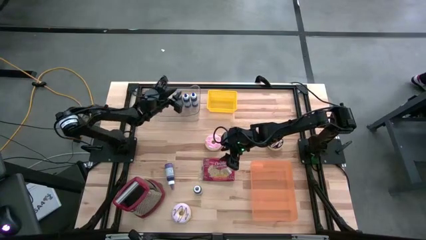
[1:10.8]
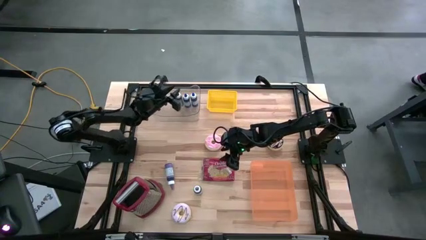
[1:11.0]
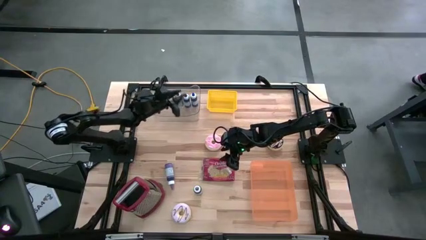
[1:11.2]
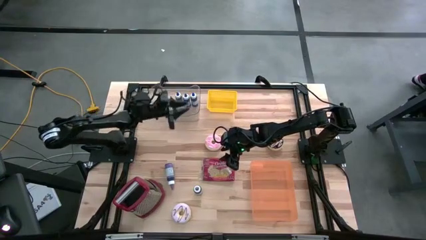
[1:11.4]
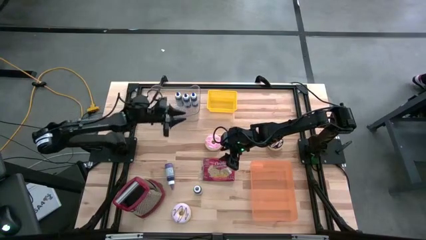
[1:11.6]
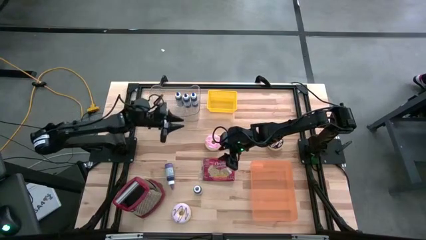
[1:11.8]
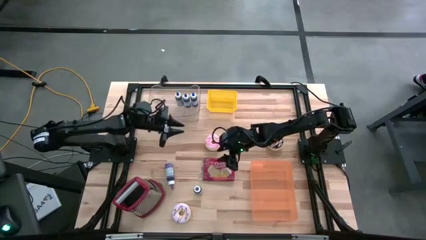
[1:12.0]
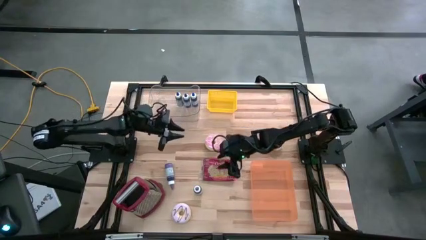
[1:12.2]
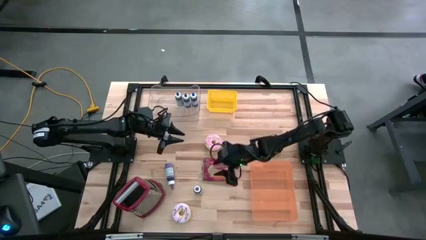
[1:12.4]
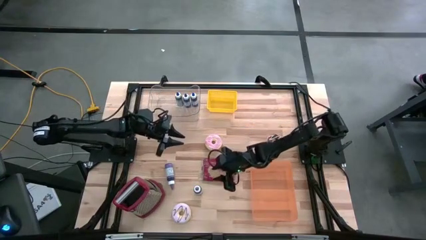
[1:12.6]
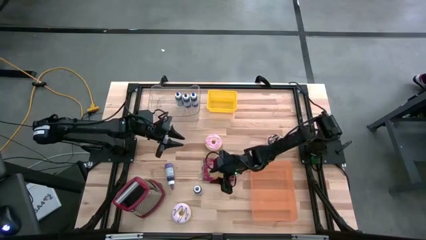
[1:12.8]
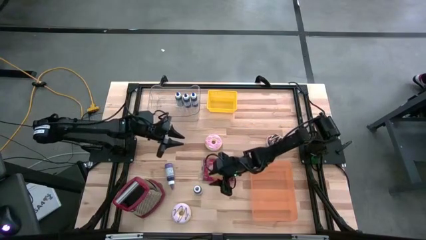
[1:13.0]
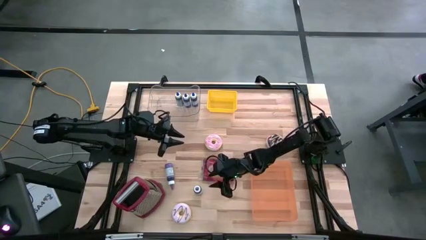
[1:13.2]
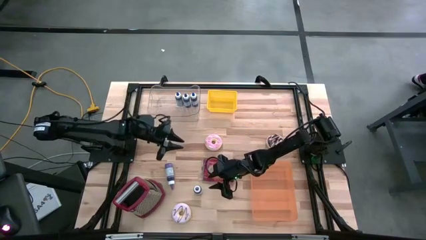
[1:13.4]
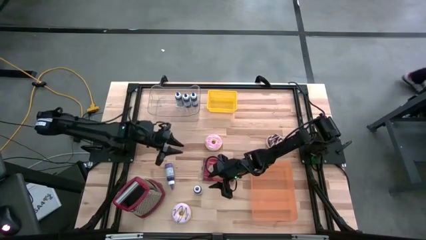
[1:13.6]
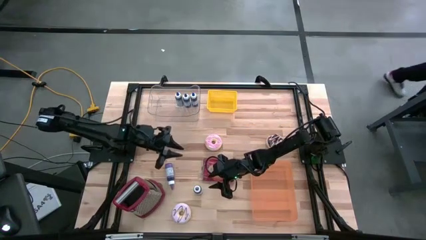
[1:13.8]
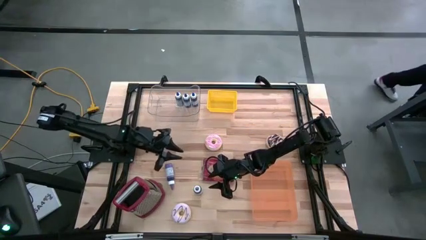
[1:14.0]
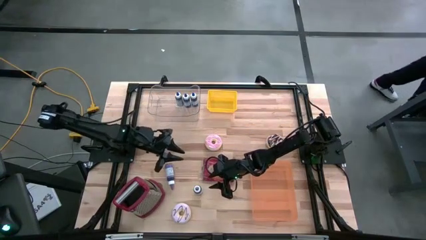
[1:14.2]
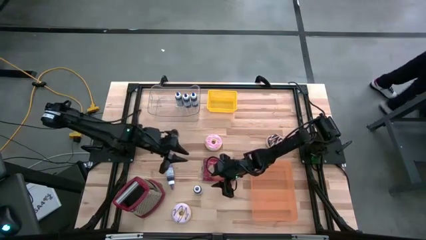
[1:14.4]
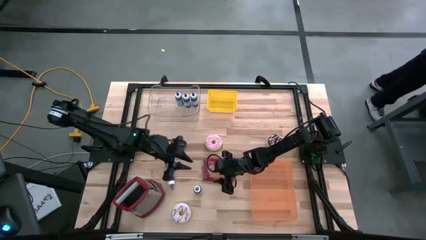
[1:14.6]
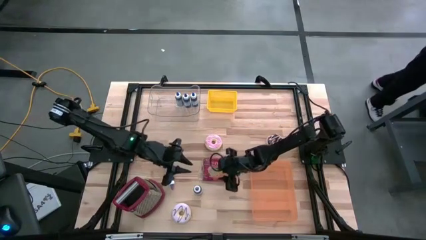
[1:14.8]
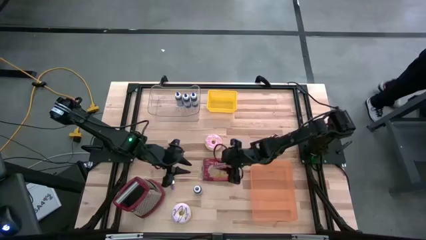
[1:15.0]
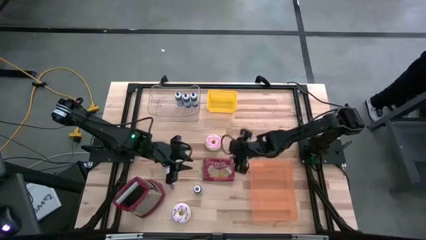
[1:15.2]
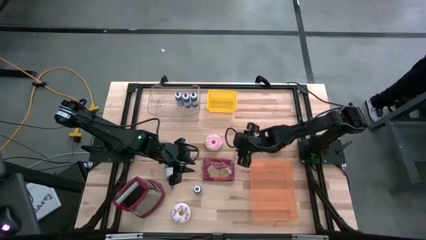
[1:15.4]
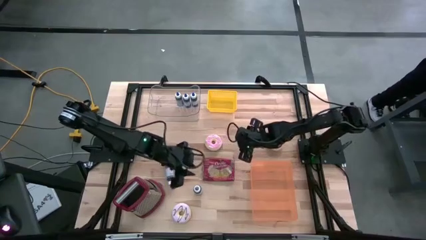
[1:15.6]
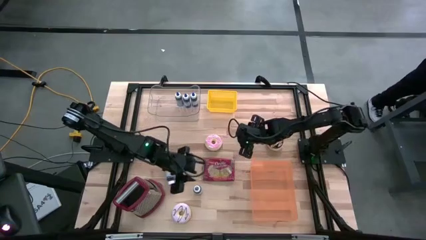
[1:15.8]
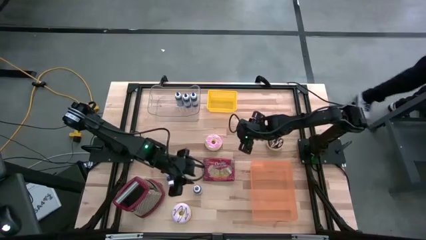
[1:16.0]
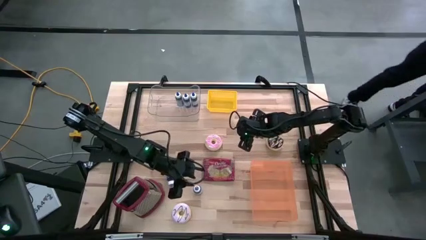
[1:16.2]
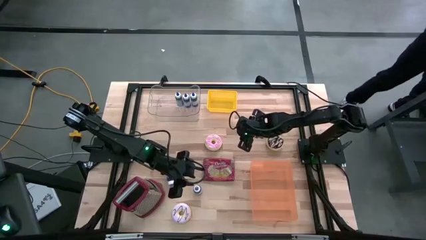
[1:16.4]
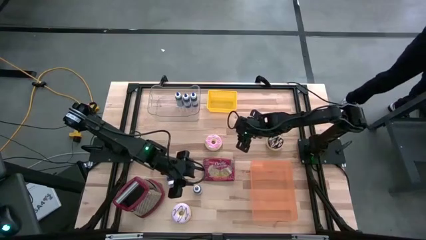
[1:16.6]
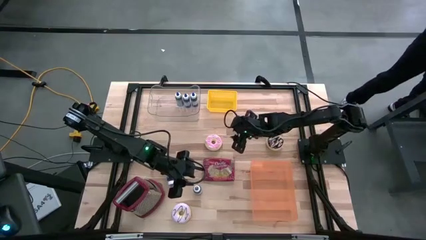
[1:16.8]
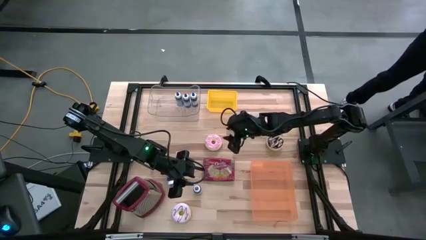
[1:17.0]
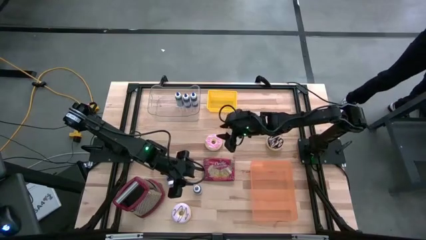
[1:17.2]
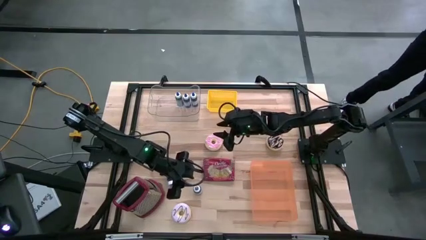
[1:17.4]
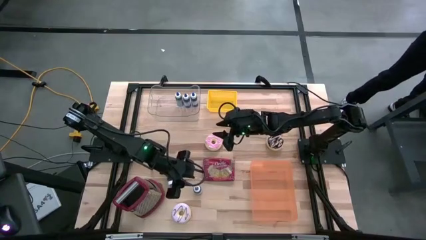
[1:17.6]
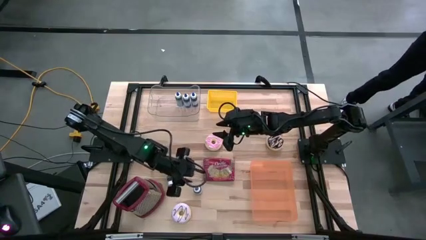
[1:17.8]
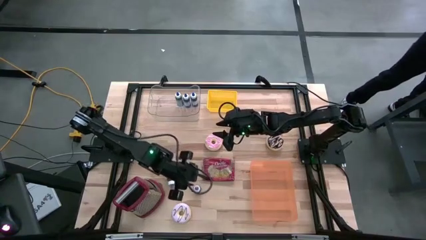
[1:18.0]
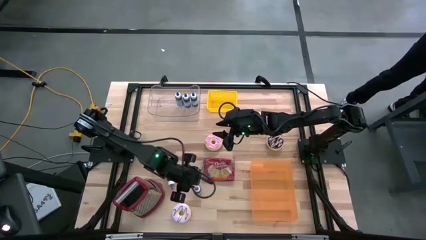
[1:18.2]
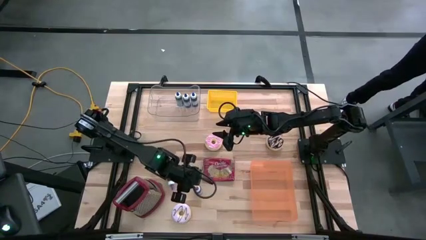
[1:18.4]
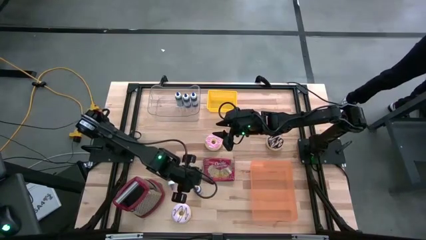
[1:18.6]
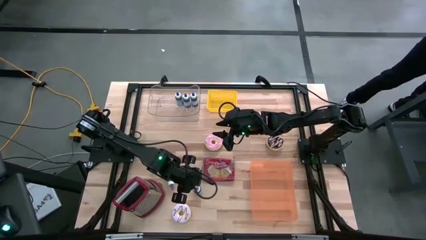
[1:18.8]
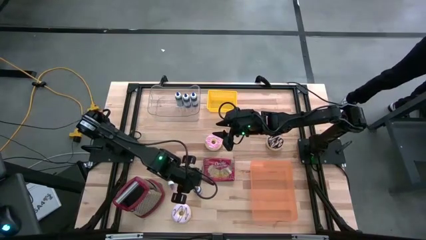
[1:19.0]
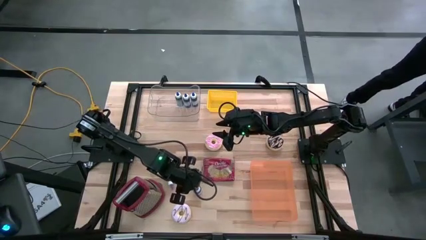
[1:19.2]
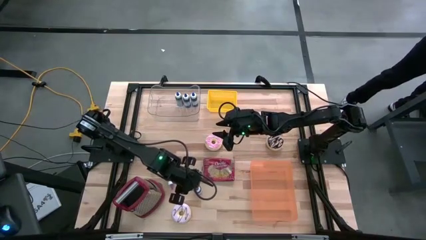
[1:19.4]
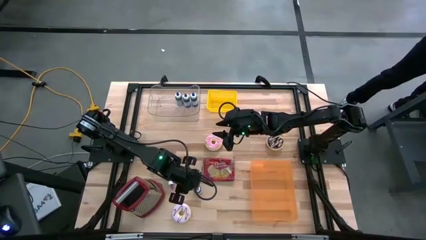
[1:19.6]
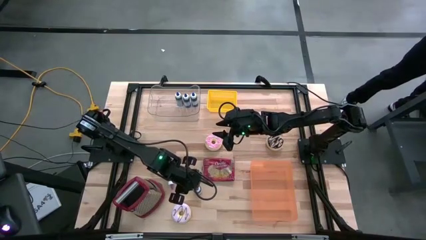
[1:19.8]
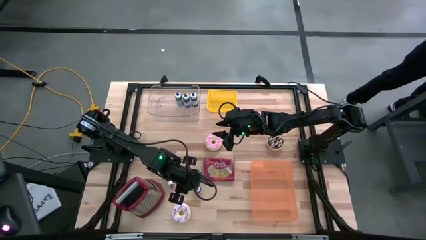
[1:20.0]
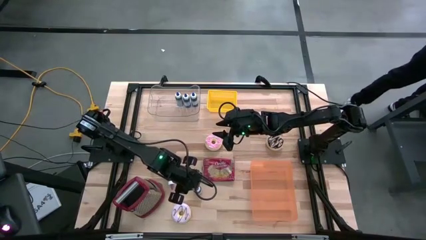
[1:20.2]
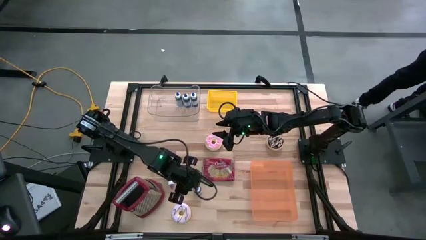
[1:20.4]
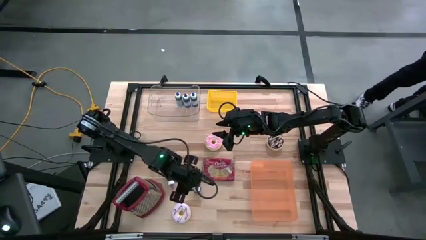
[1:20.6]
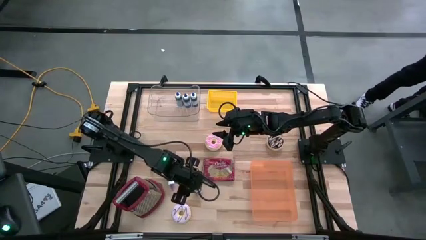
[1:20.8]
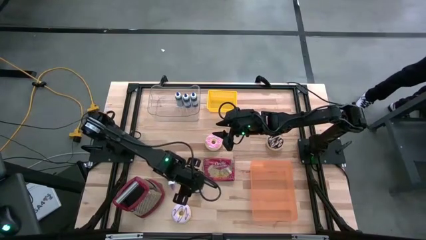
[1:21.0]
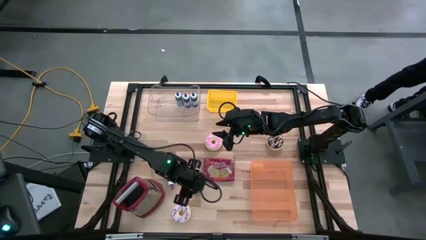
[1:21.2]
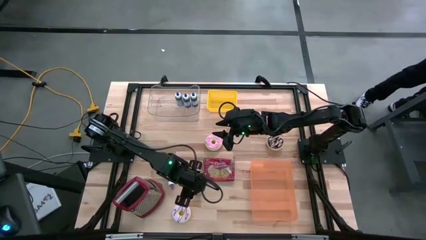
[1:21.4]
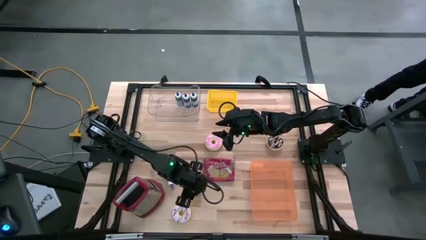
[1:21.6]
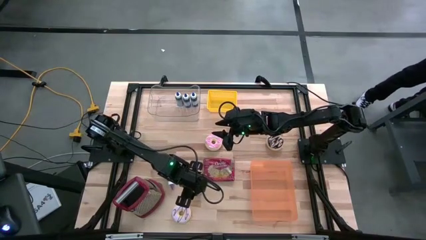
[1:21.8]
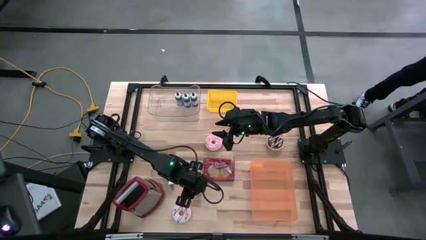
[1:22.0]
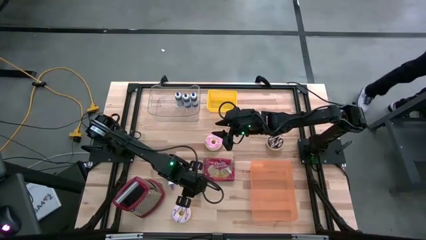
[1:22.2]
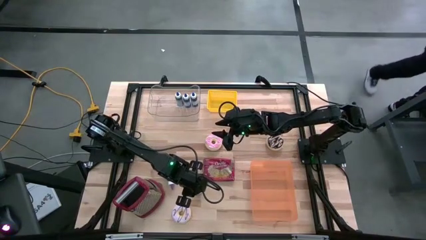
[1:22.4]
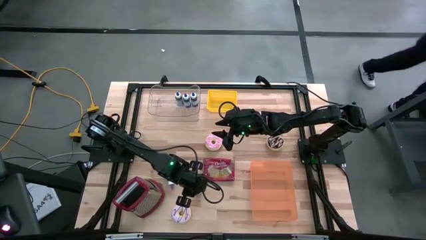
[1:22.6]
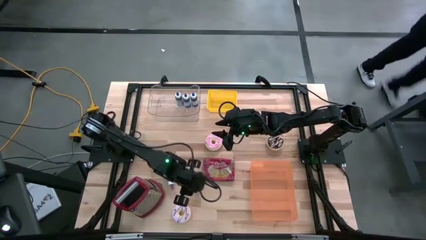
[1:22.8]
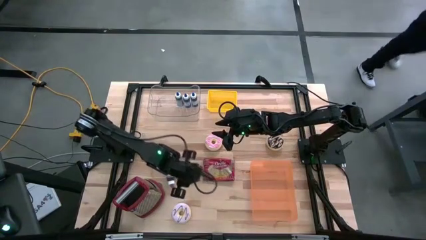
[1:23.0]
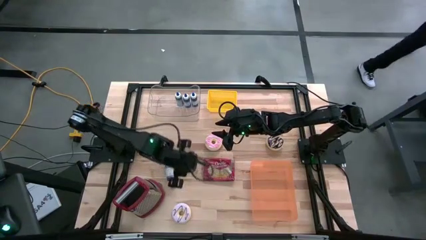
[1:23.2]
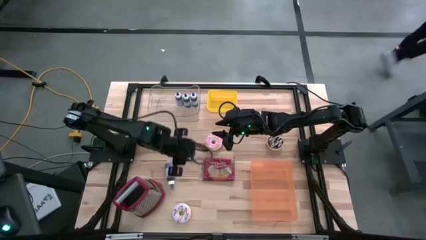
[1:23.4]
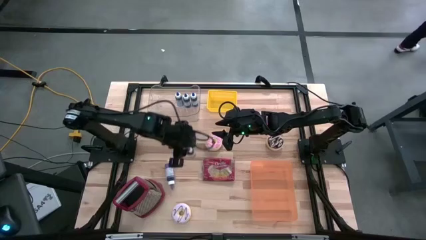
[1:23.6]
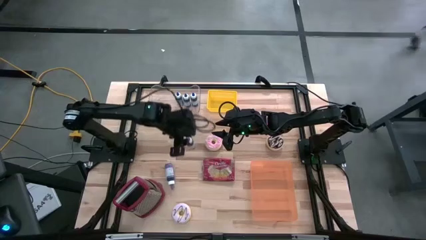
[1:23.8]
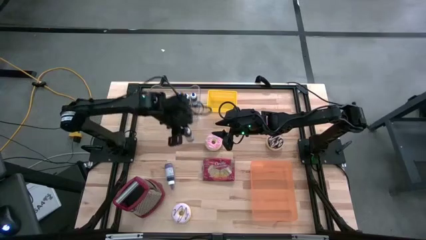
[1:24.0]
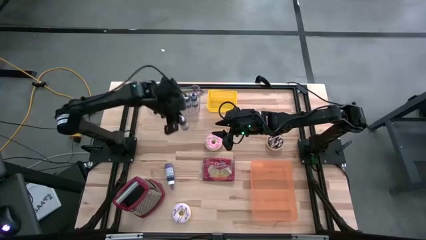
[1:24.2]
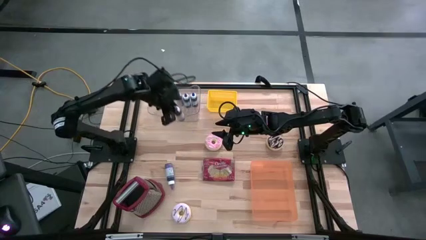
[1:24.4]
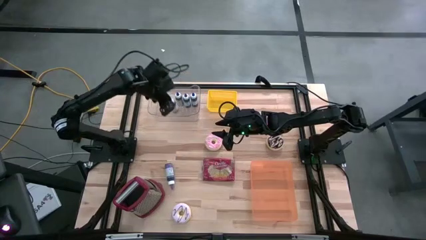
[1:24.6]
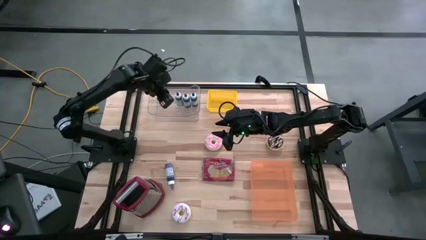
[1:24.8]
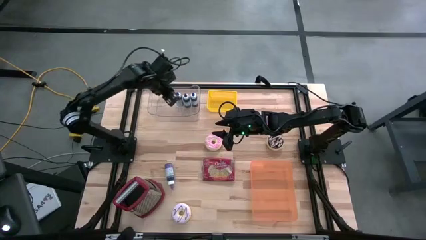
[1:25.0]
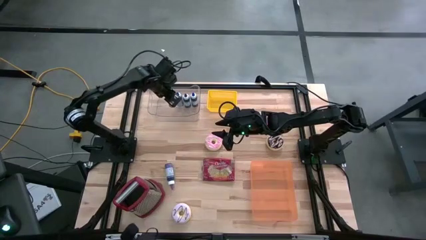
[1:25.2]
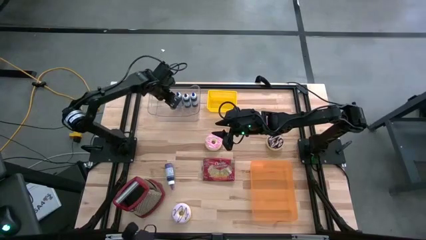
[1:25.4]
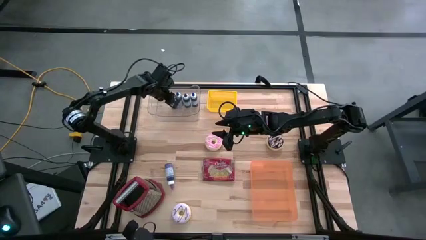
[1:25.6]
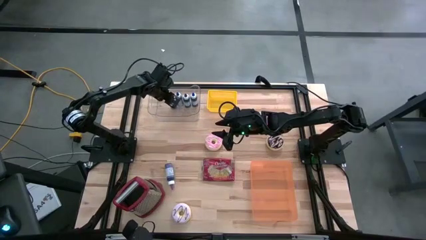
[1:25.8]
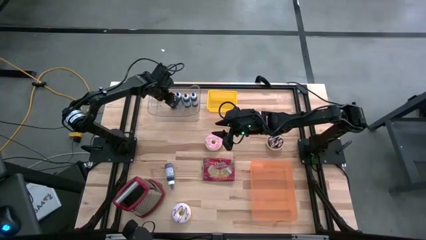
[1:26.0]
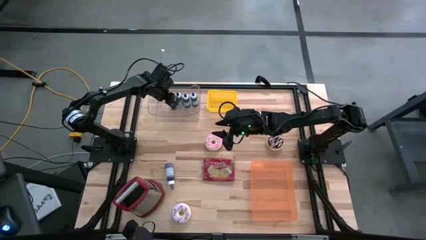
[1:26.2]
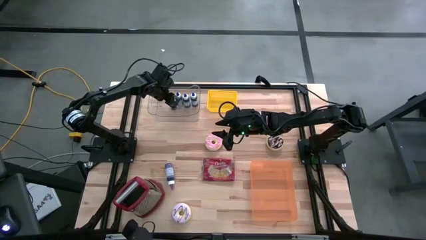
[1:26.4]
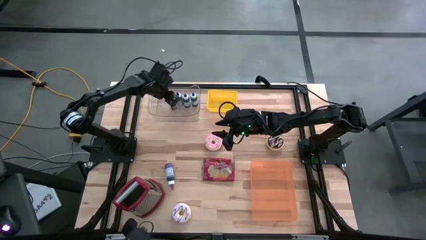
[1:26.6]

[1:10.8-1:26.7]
Put the right violet food coloring bottle into the transparent bin
